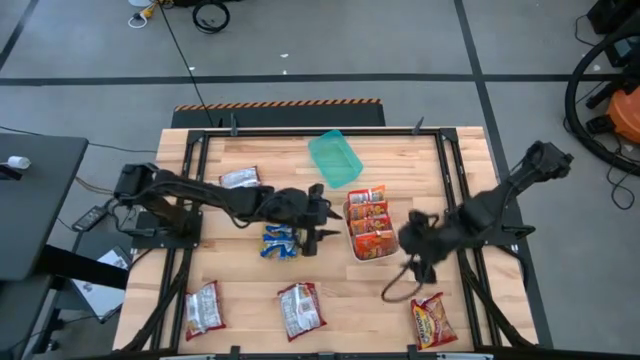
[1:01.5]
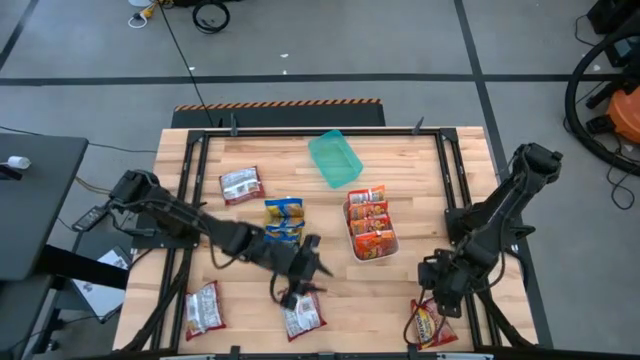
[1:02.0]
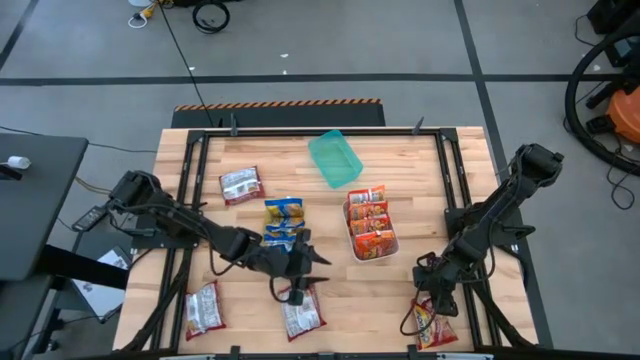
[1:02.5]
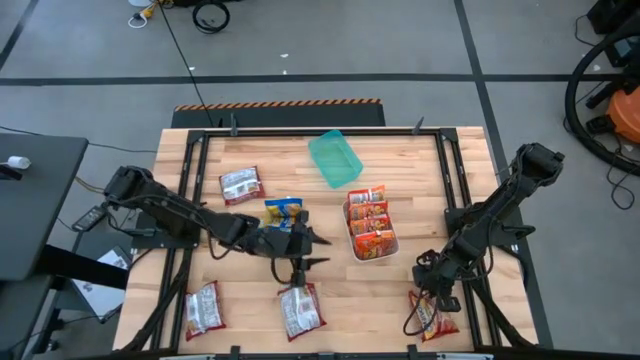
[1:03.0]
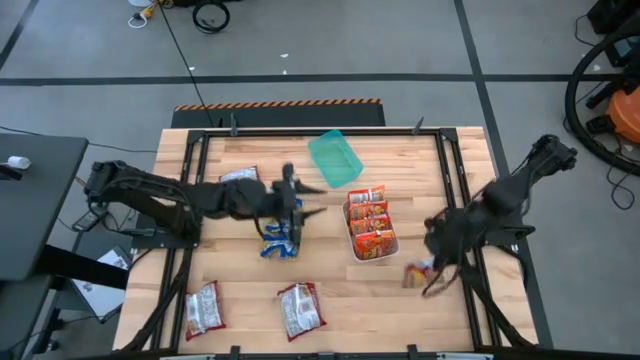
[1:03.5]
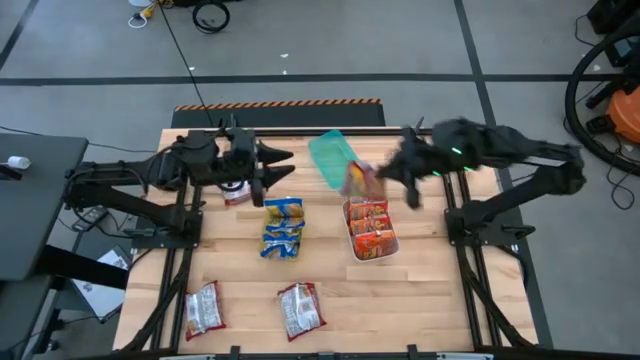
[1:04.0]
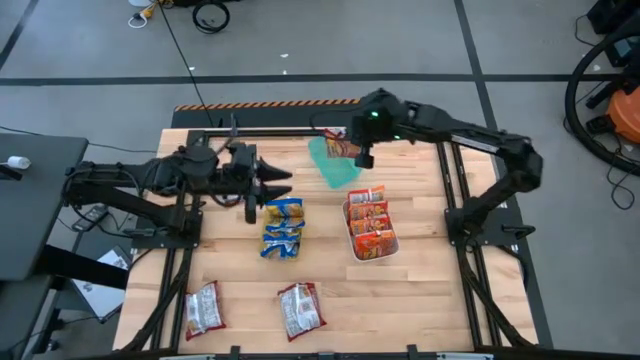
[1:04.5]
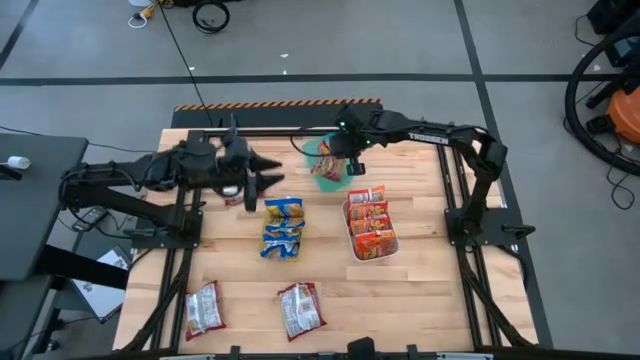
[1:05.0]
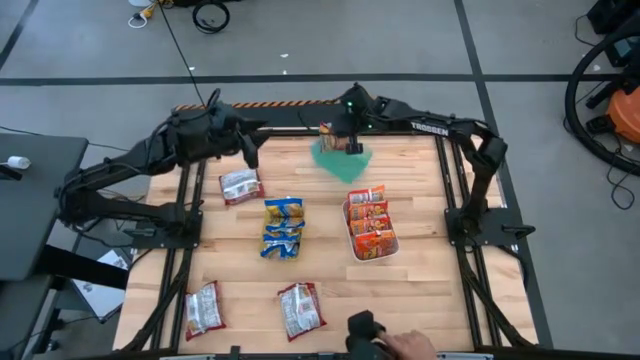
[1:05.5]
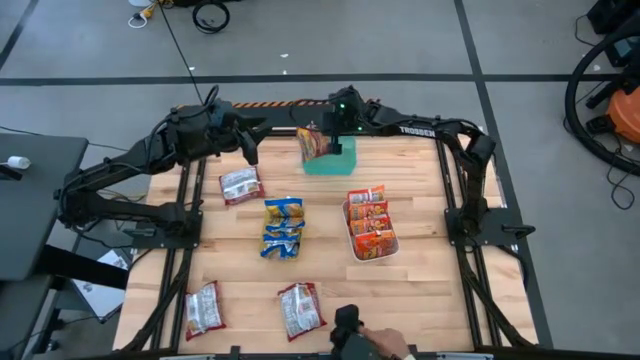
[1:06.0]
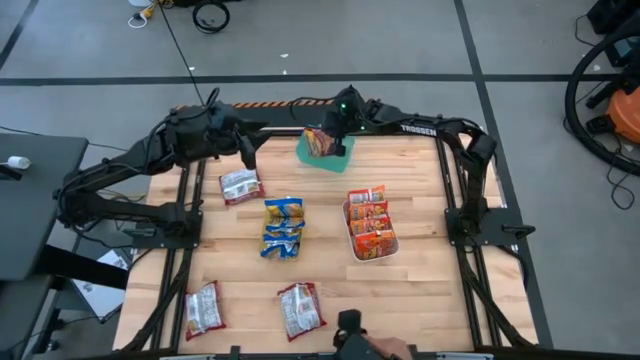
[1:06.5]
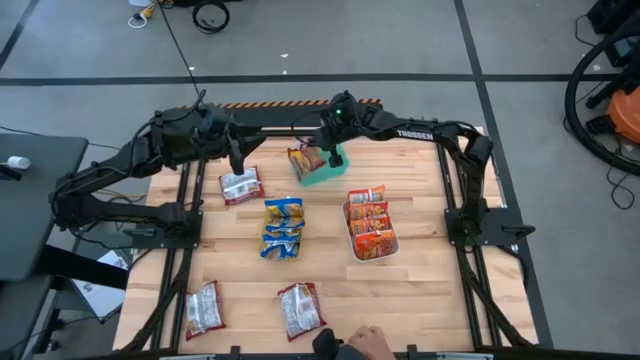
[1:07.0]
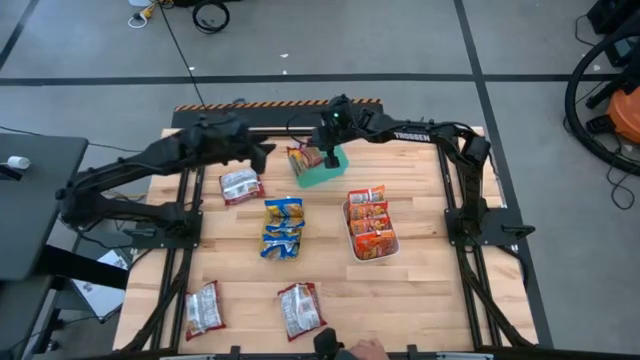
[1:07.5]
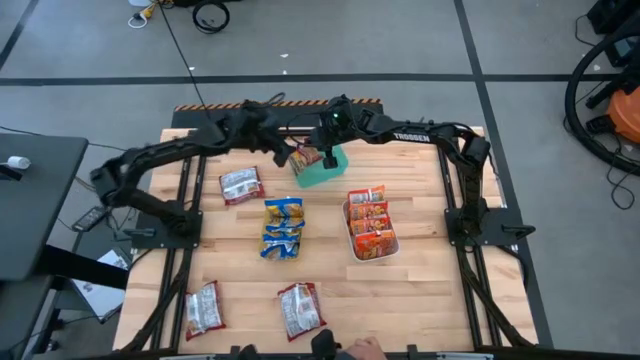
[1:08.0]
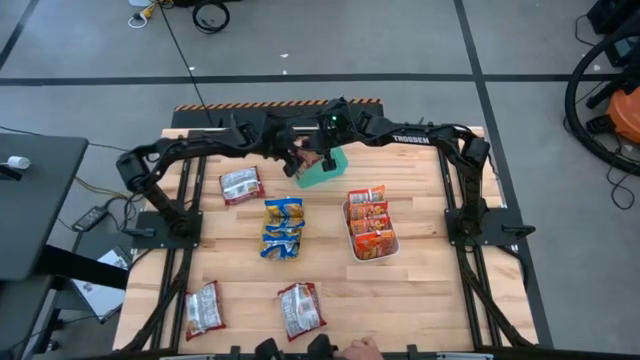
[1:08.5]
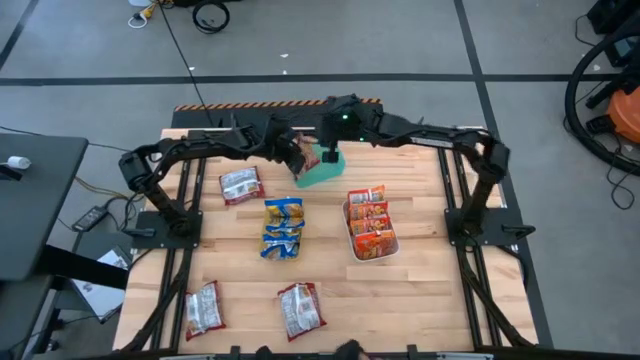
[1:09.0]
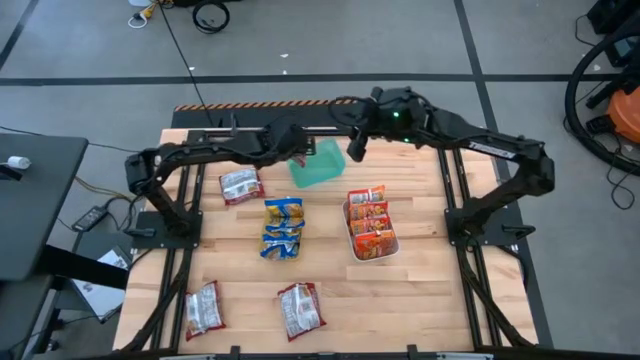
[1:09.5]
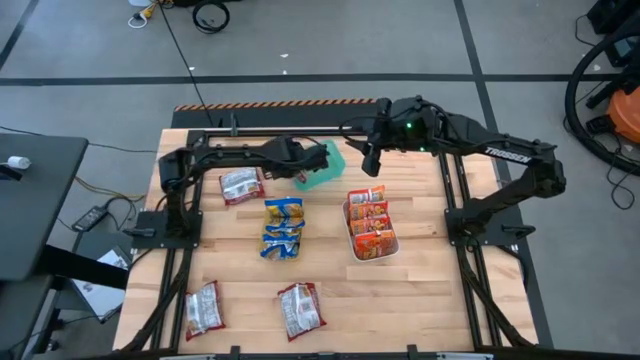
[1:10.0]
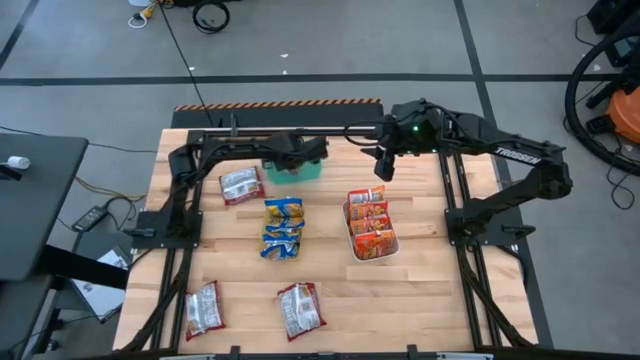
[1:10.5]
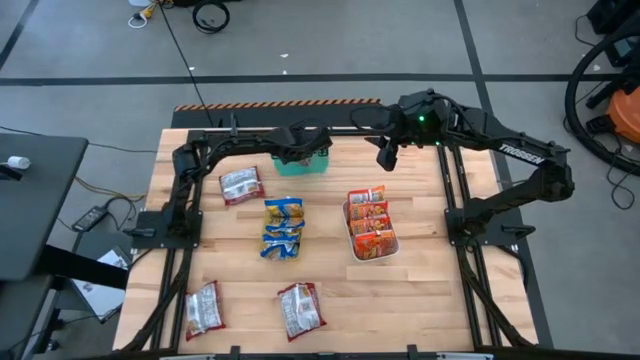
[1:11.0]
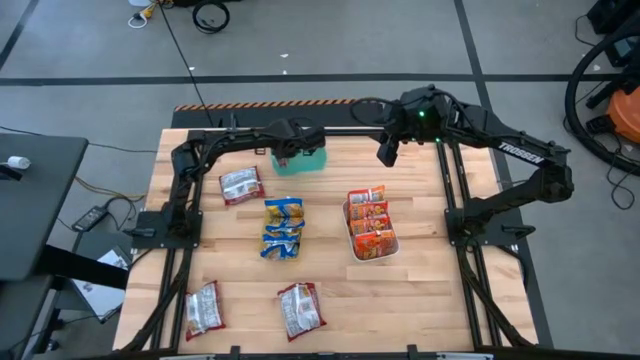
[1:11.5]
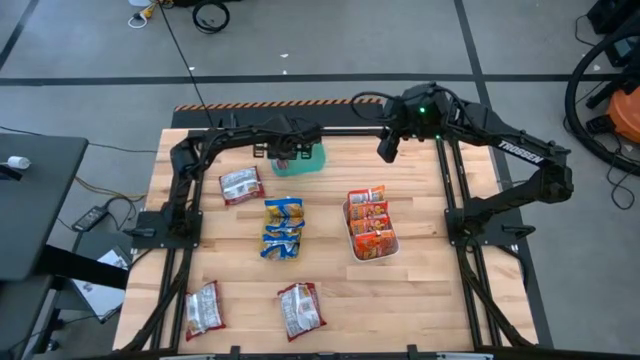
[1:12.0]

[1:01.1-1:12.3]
Task: Sort Maruchan noodles
Put the bottom right red noodle pack into the green bin

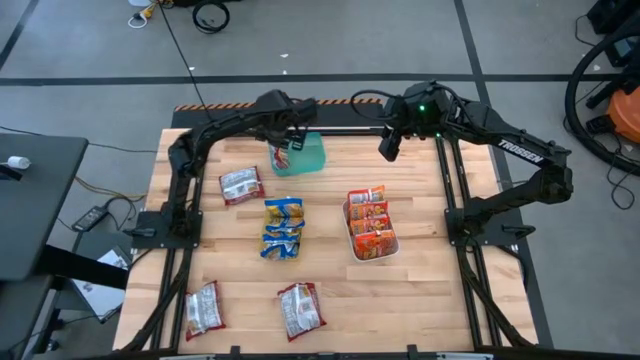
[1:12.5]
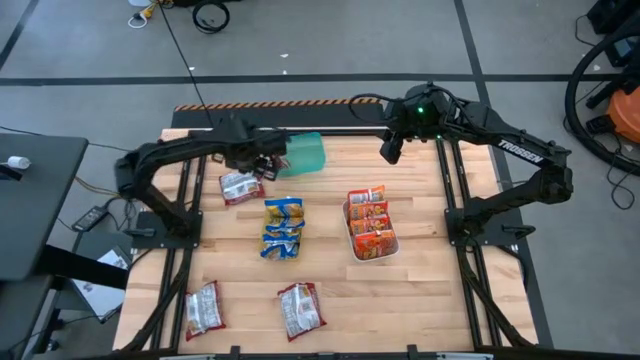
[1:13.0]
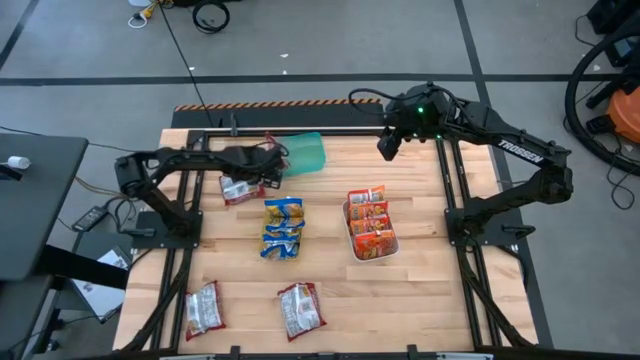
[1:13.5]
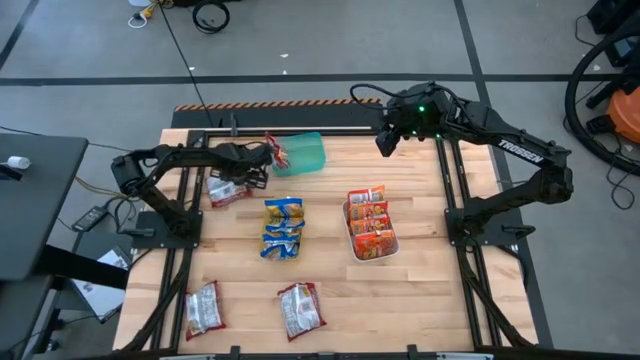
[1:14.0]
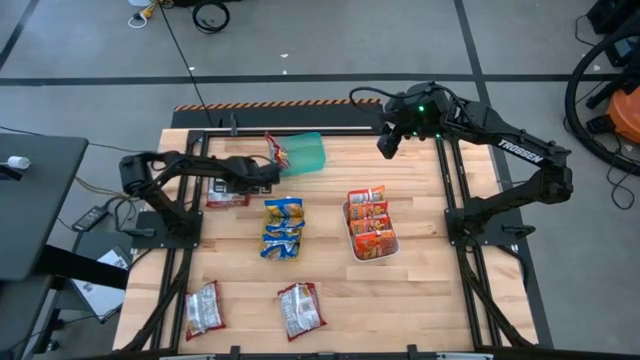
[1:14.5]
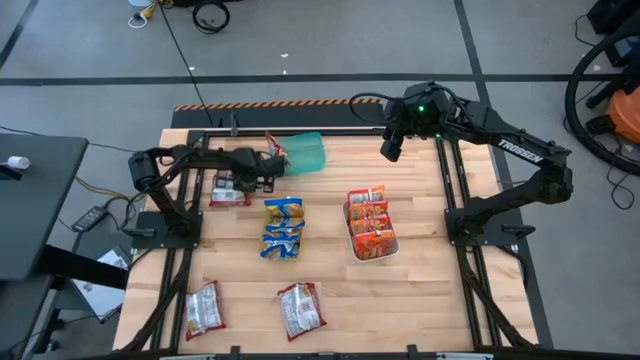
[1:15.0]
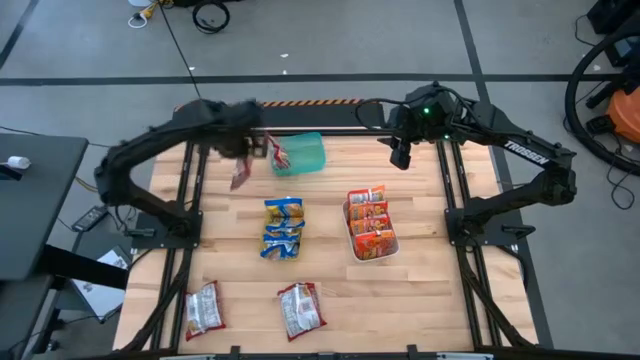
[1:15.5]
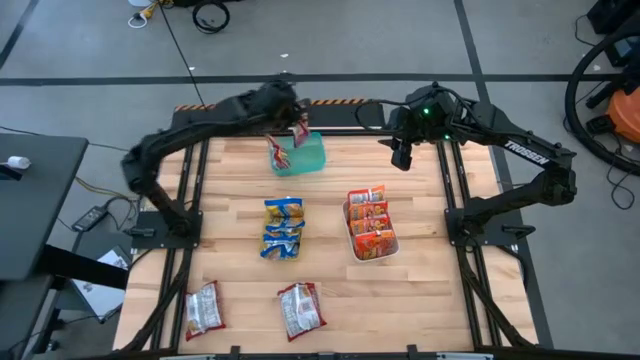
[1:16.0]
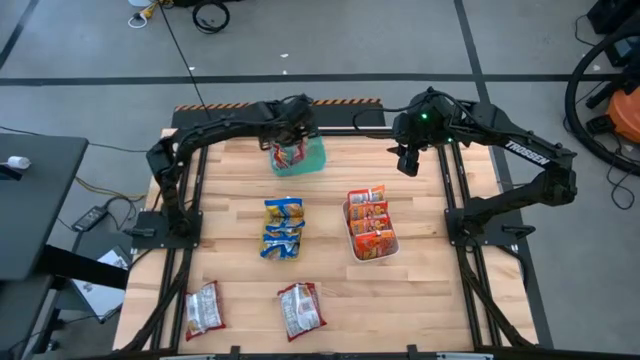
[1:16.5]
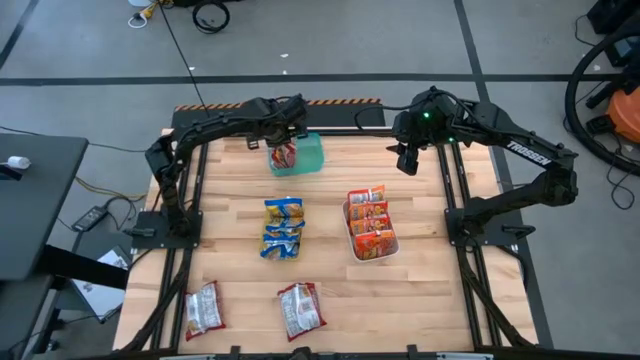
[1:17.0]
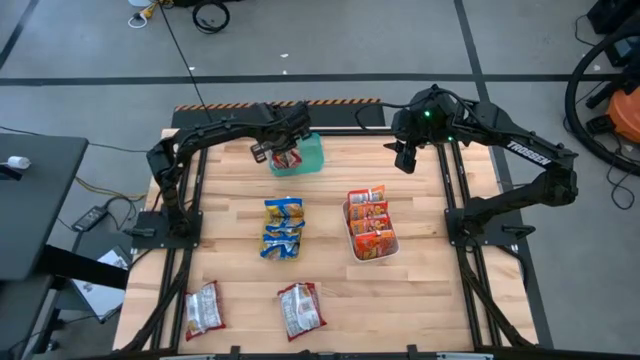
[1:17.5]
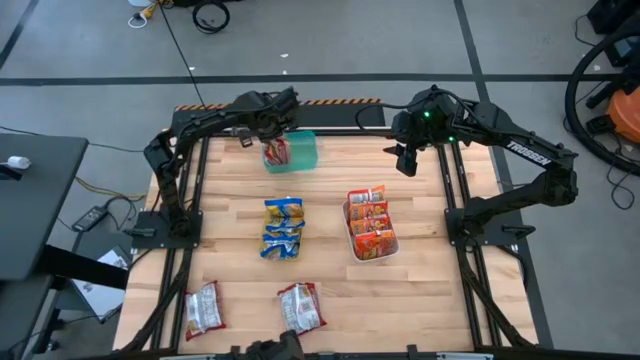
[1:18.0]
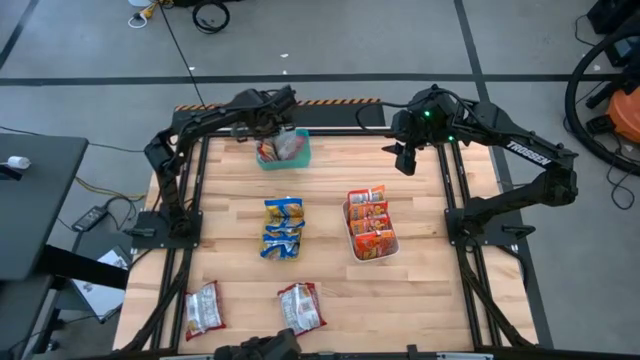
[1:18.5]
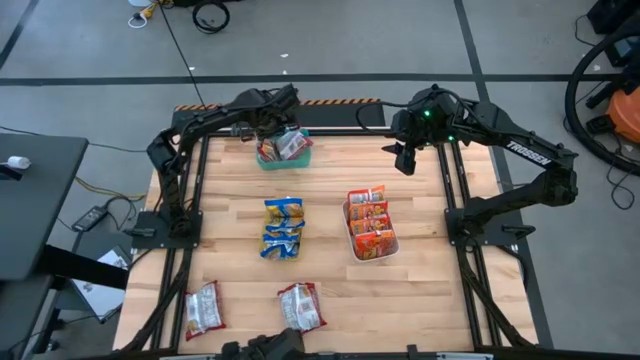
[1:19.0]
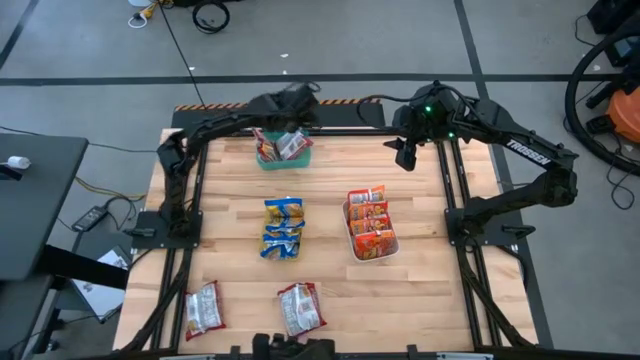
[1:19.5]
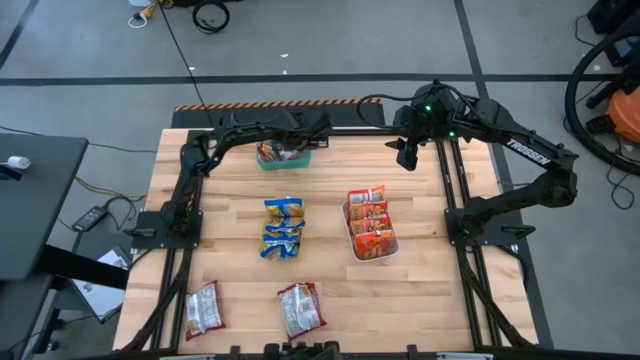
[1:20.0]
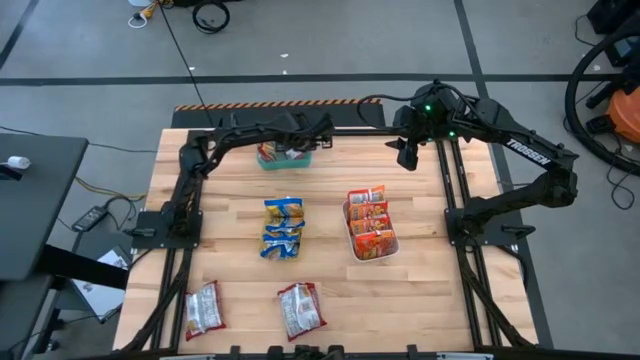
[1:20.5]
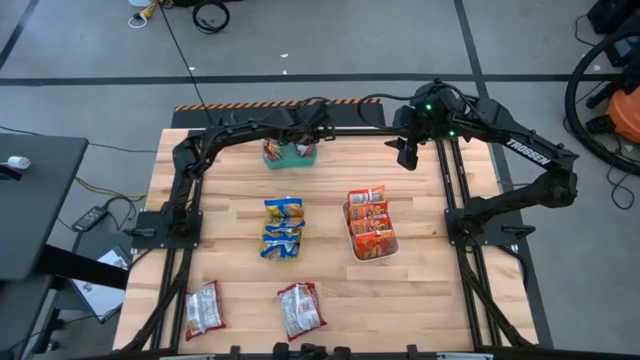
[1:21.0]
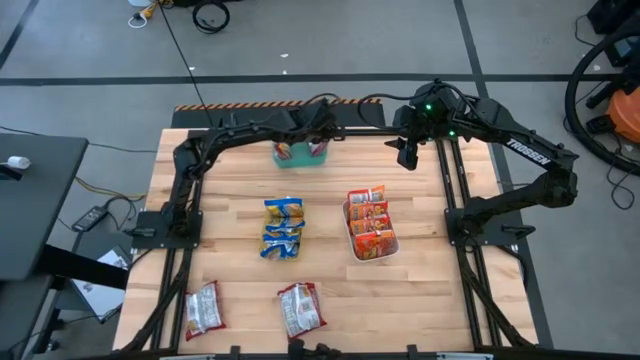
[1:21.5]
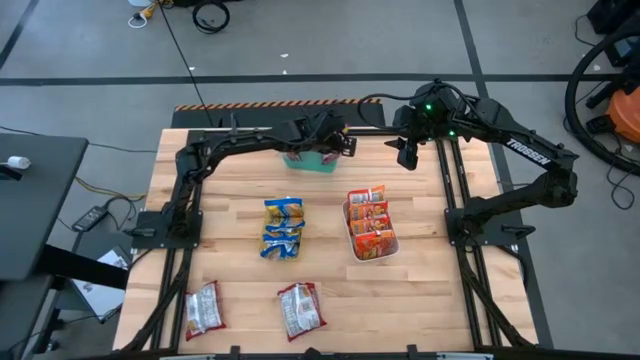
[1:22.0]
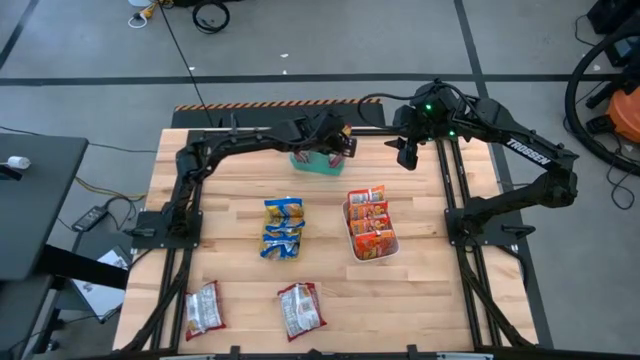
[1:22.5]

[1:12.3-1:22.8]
Put the top orange noodle pack into the white bin

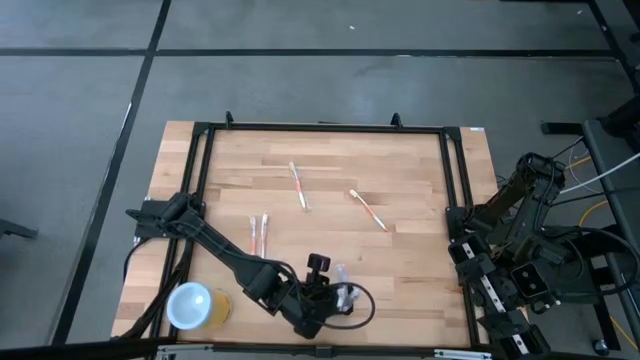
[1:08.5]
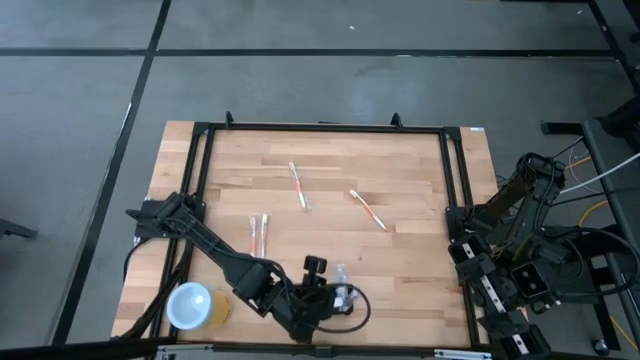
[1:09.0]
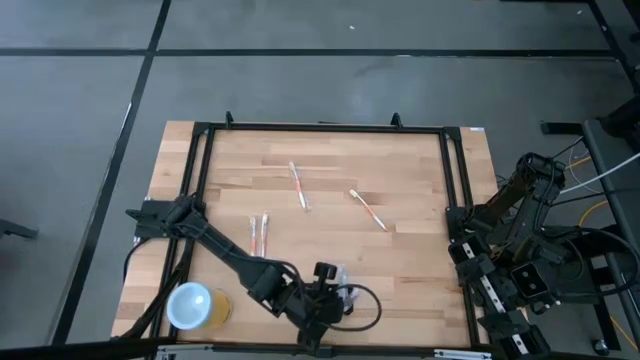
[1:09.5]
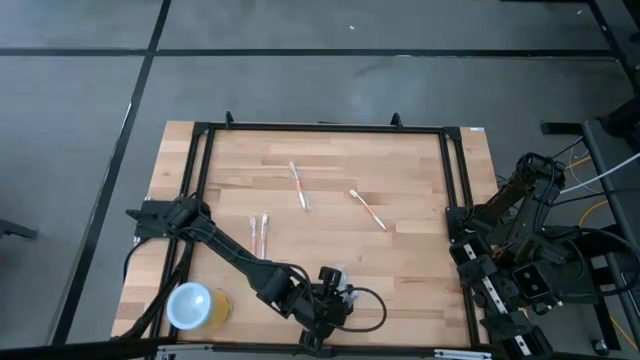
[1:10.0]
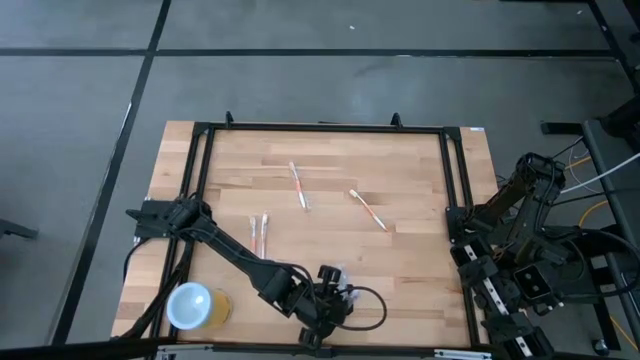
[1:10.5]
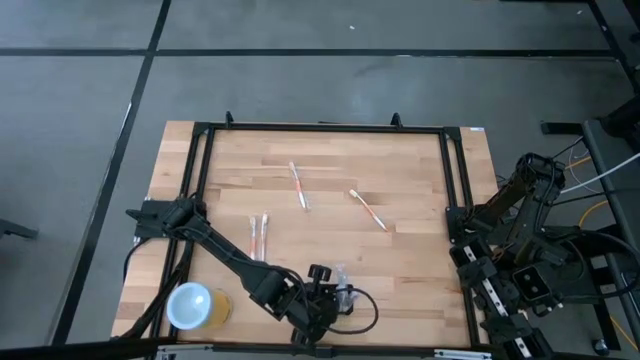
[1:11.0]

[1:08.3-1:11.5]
Task: Pick & Place toothbrushing station
Adjust the mouthwash in the mesh organizer
